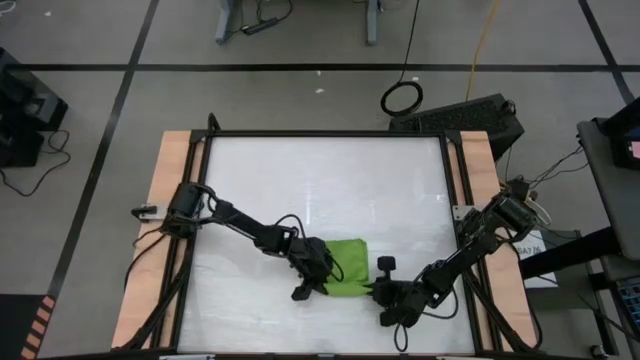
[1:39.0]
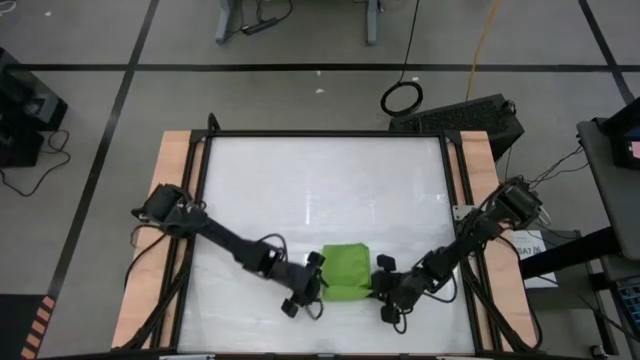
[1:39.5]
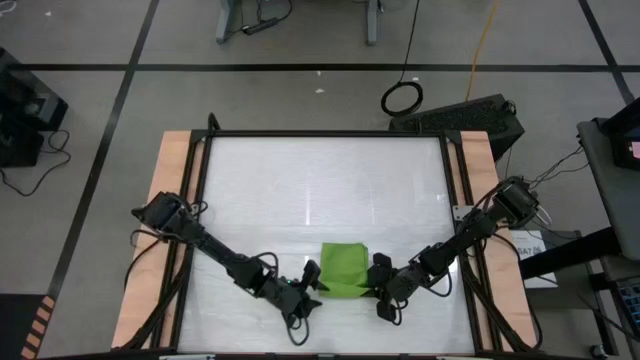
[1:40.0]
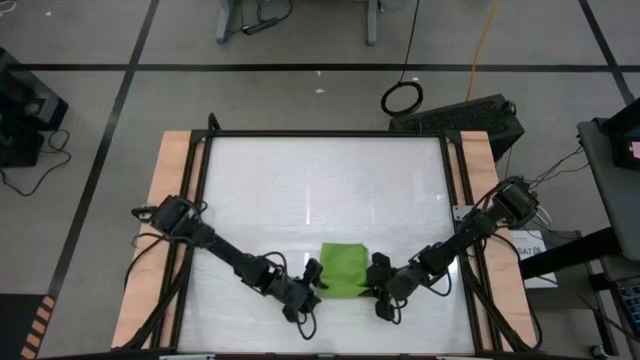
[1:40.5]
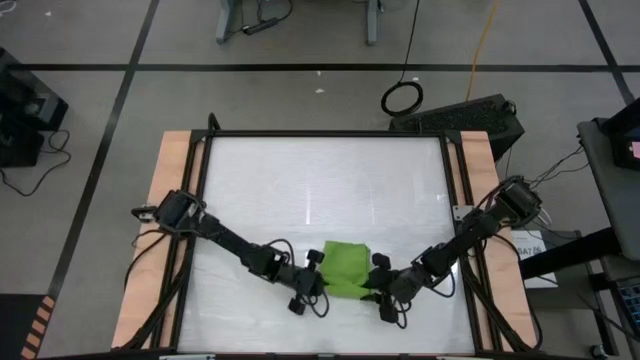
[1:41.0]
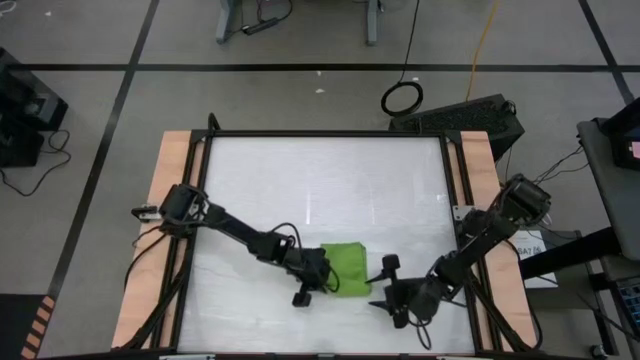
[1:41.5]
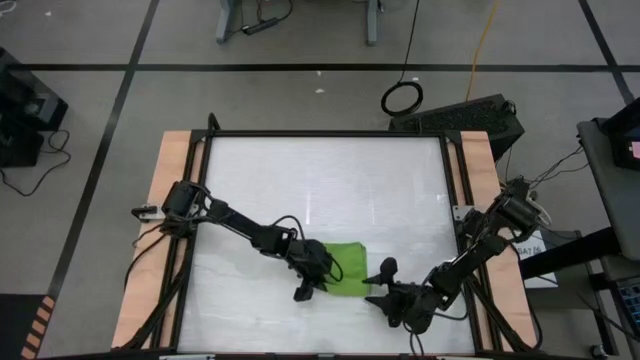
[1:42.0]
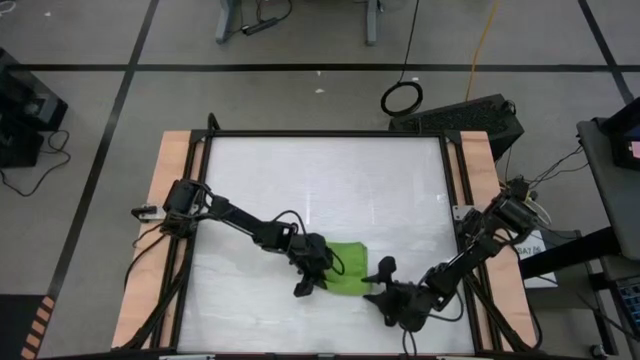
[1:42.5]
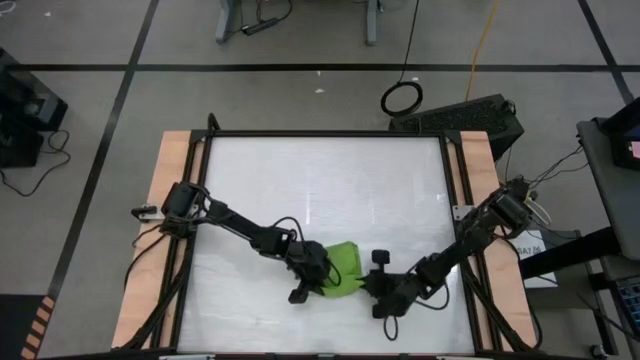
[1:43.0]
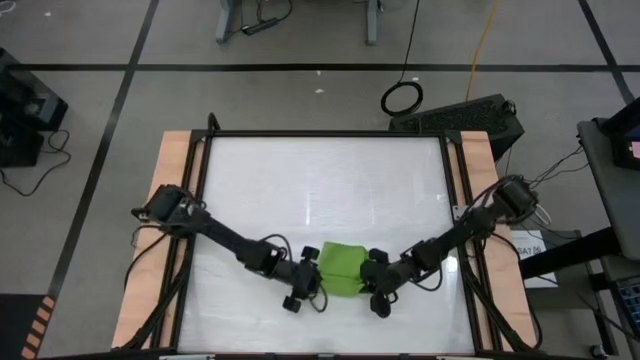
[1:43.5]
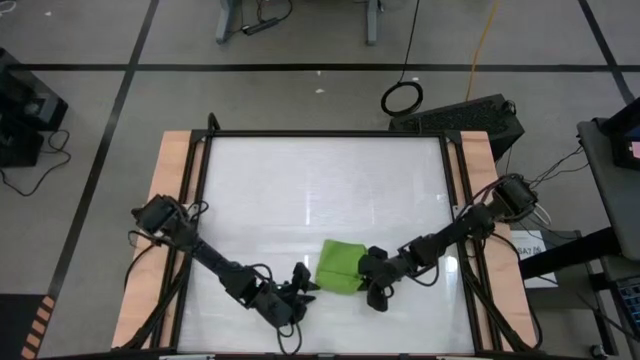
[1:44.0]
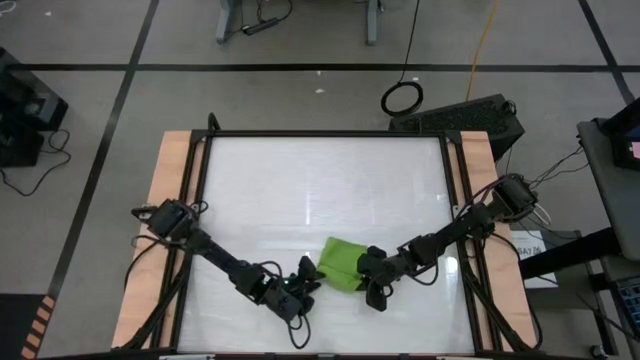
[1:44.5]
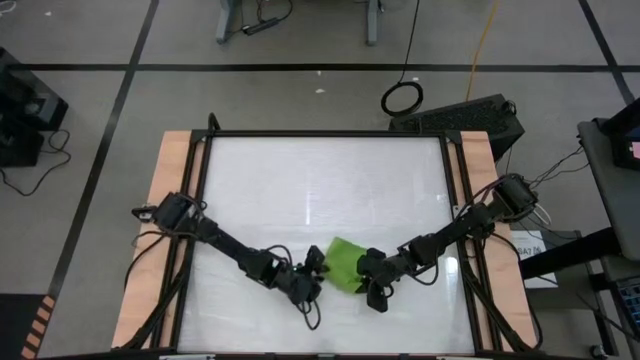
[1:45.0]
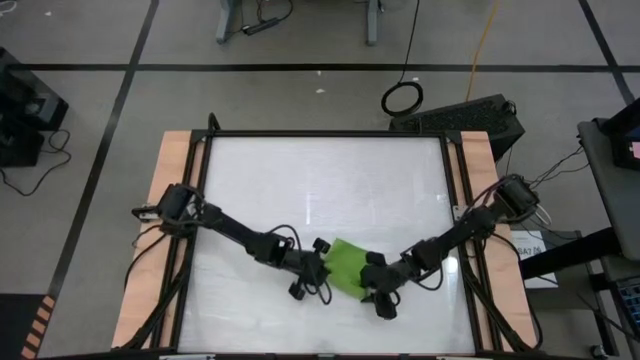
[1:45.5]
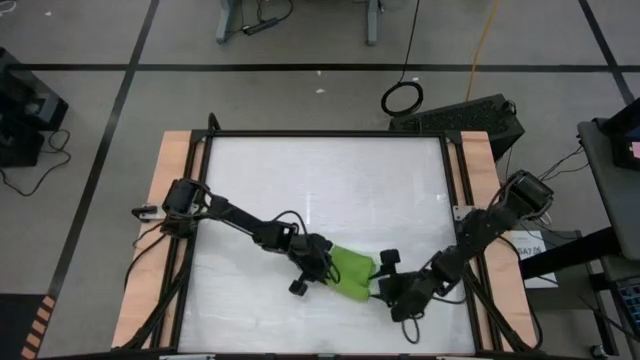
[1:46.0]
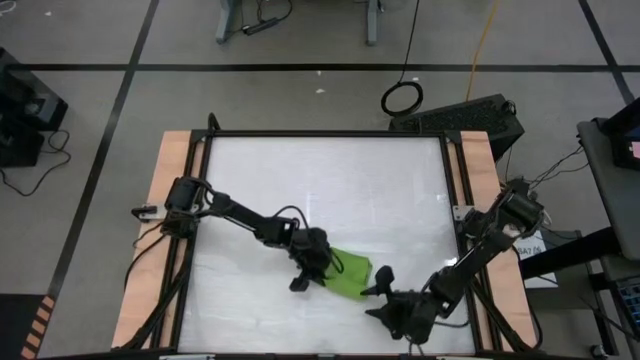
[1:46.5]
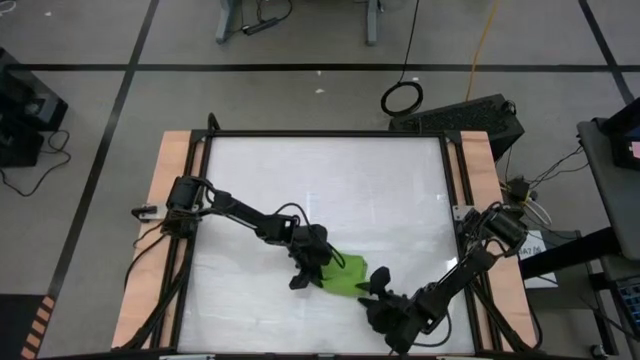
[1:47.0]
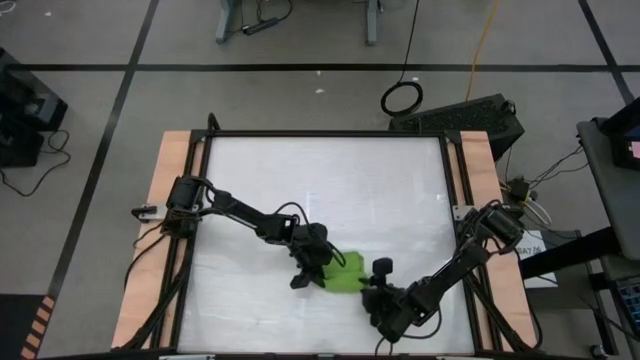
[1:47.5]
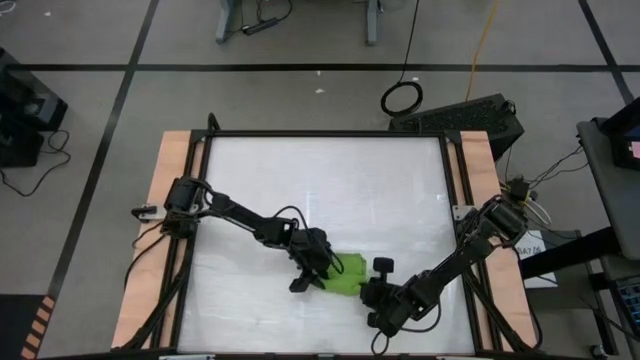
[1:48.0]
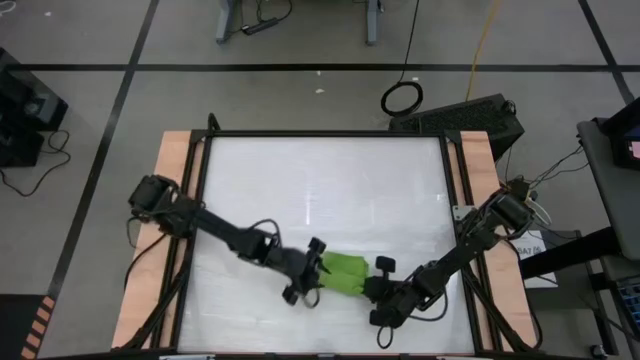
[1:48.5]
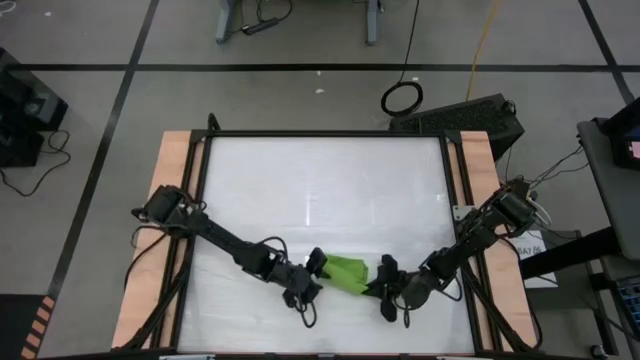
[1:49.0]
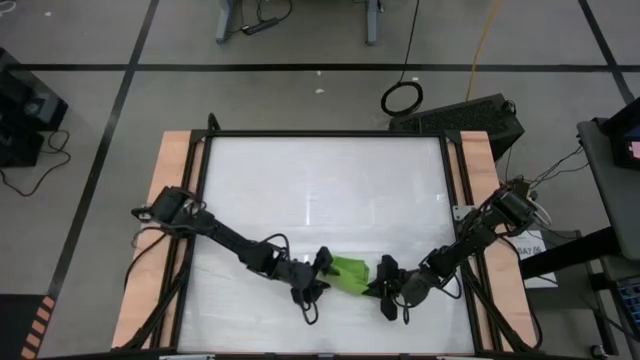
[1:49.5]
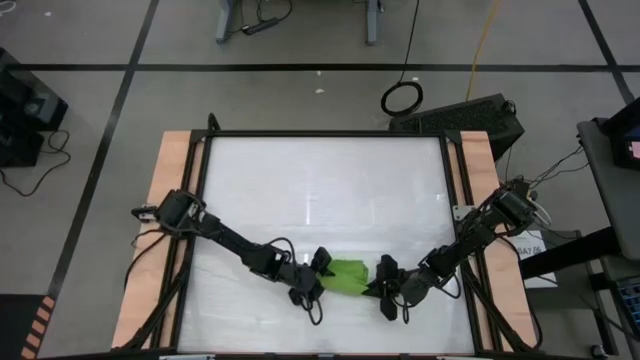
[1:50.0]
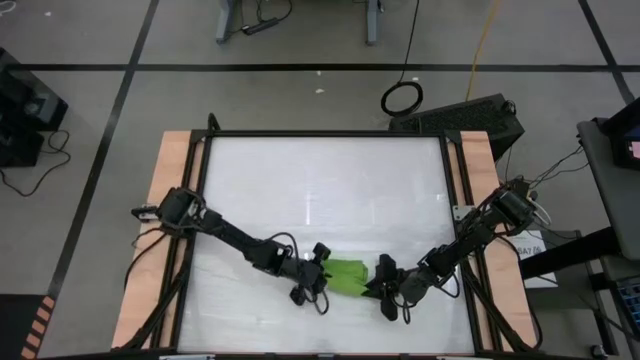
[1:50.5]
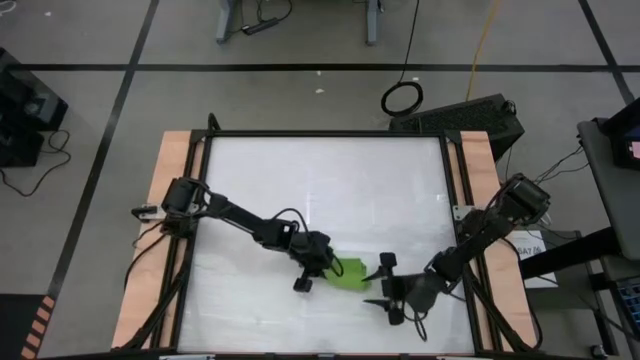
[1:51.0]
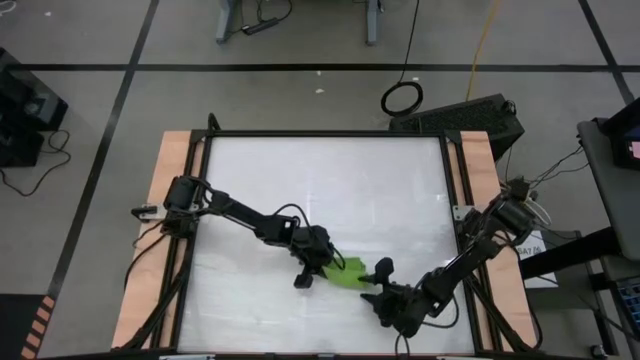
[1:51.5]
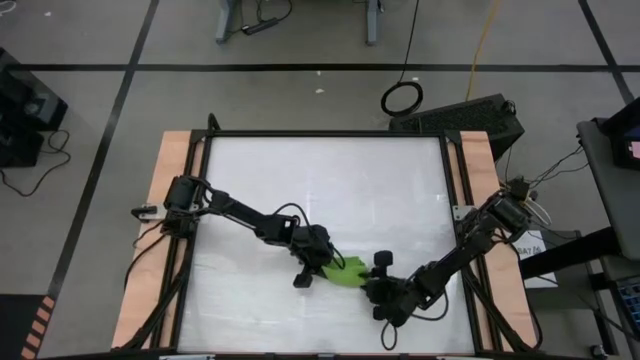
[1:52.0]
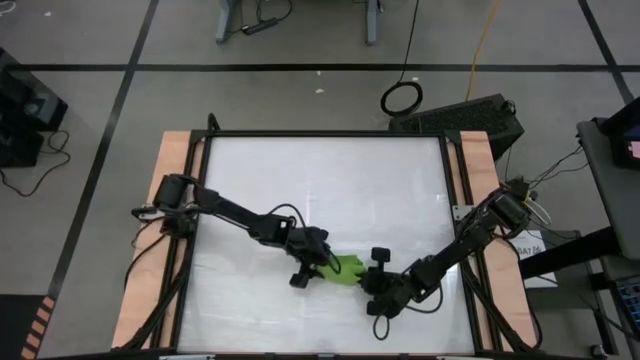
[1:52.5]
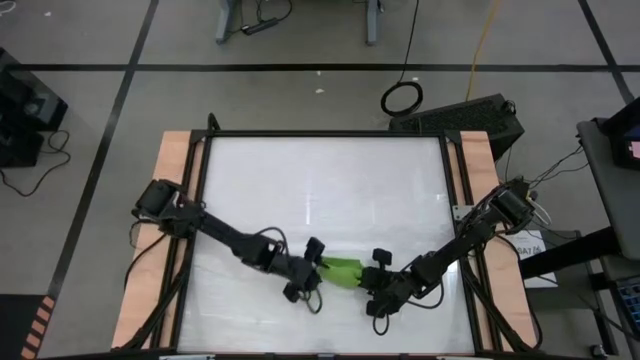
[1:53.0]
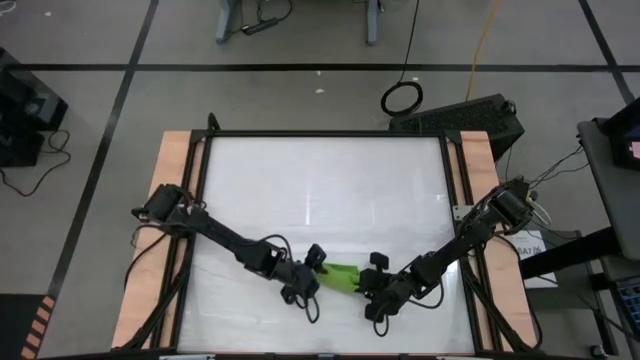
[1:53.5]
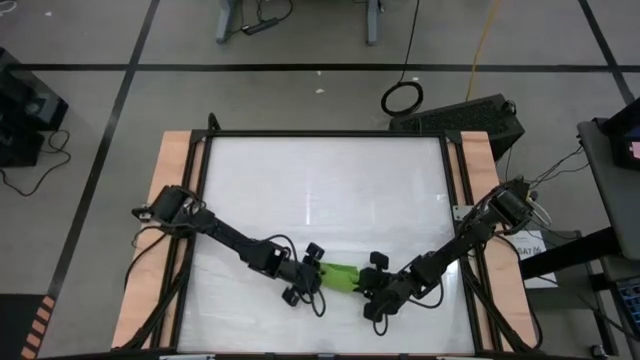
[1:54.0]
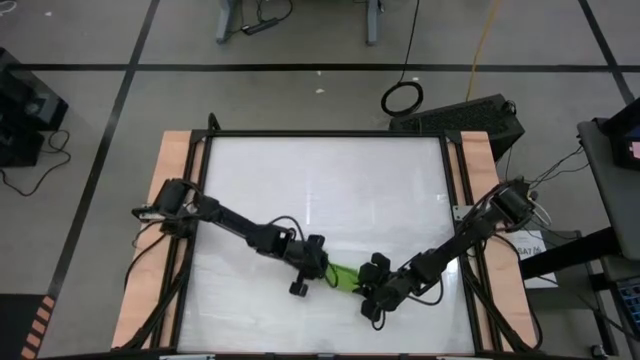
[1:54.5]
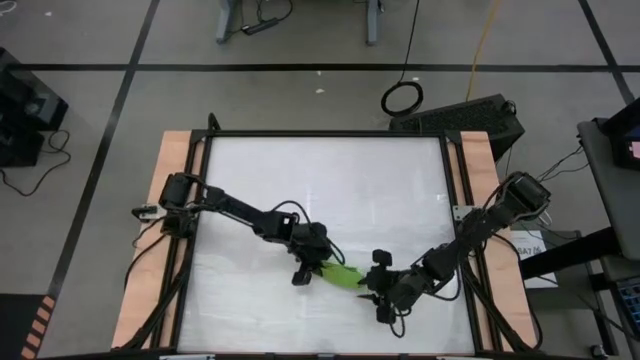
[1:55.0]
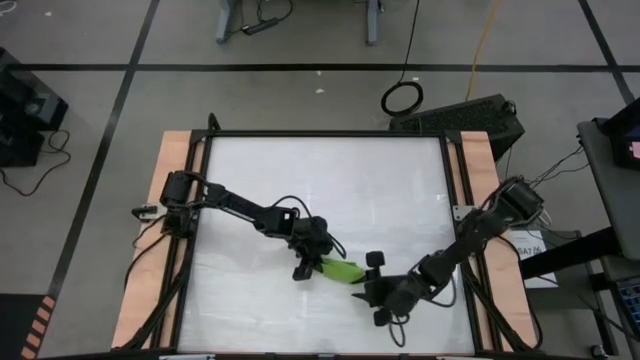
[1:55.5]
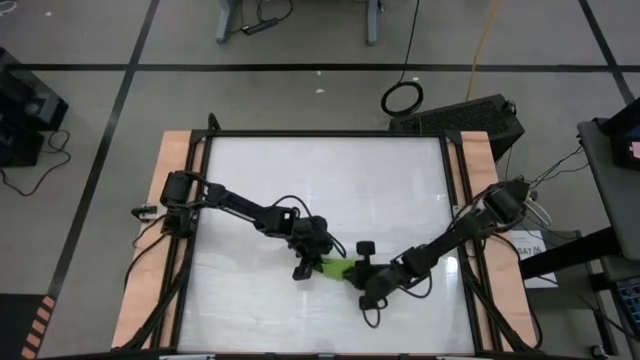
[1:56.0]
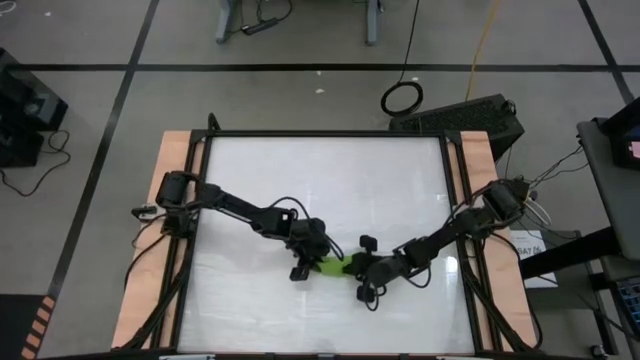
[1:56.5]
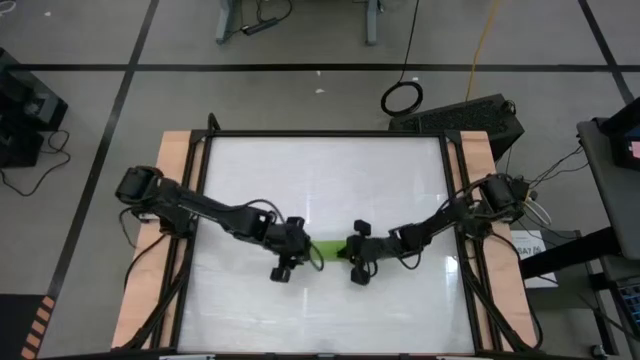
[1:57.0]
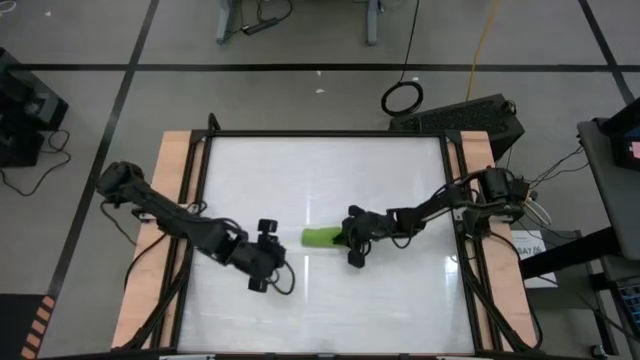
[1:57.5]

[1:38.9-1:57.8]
Task: Roll towel
Roll the green towel on the table
